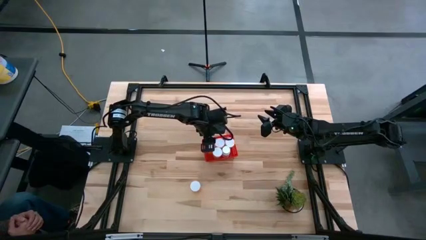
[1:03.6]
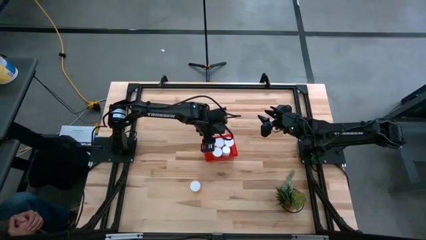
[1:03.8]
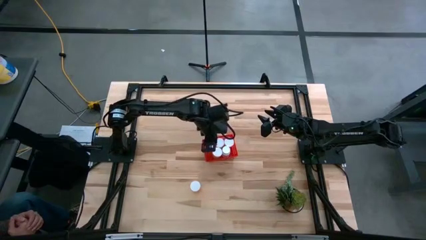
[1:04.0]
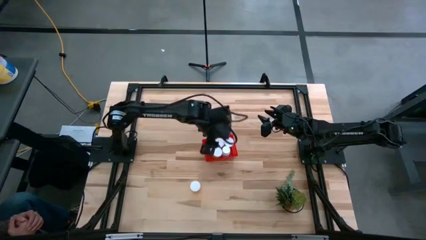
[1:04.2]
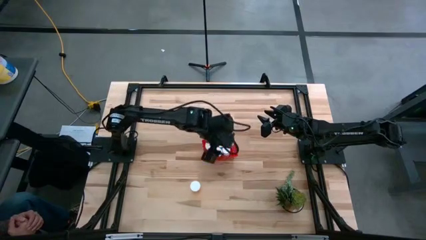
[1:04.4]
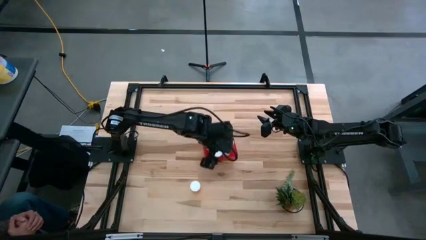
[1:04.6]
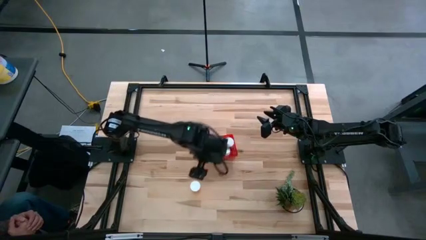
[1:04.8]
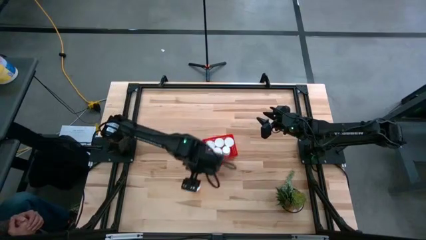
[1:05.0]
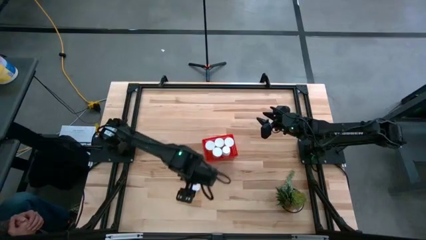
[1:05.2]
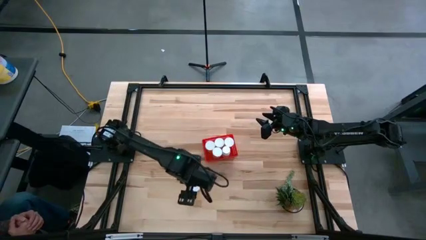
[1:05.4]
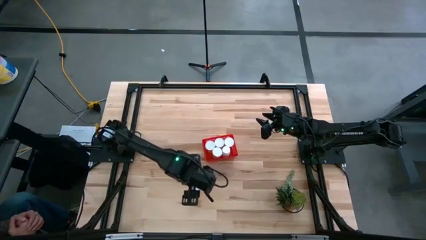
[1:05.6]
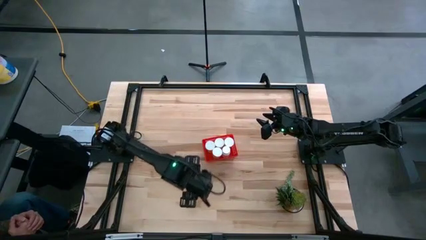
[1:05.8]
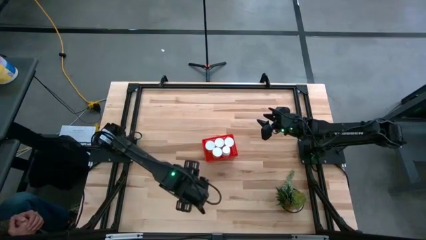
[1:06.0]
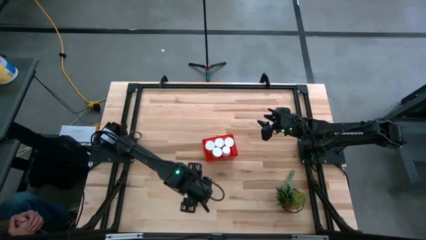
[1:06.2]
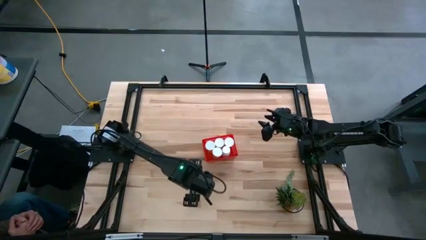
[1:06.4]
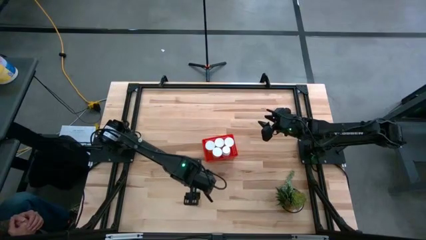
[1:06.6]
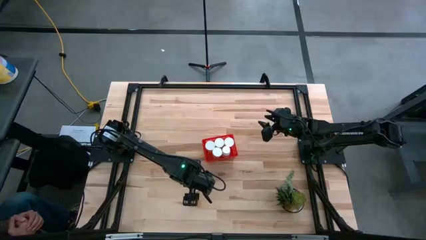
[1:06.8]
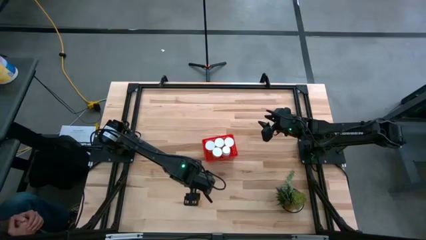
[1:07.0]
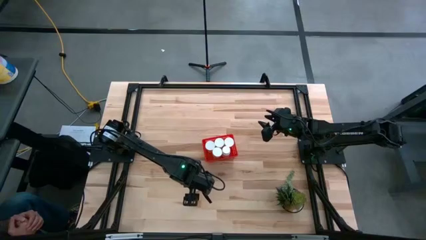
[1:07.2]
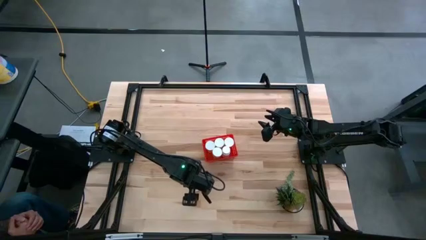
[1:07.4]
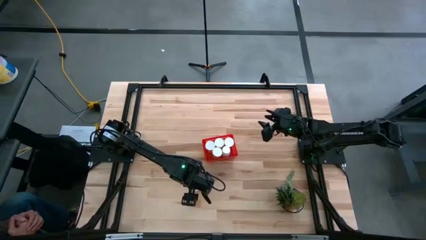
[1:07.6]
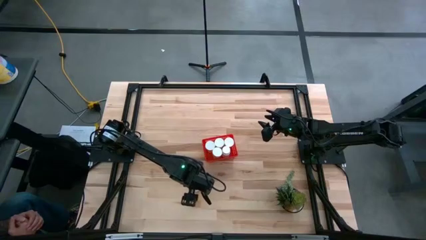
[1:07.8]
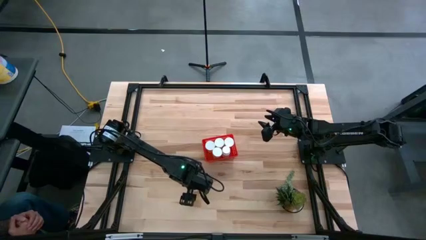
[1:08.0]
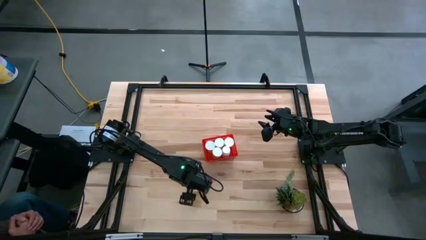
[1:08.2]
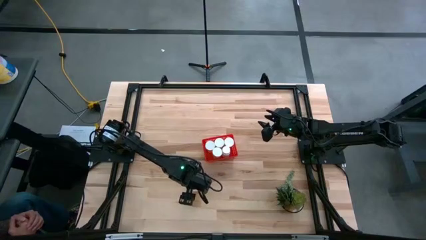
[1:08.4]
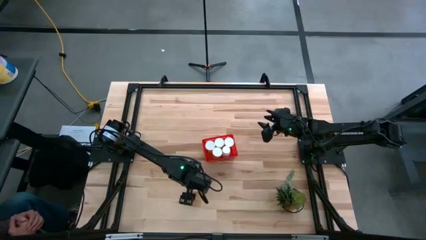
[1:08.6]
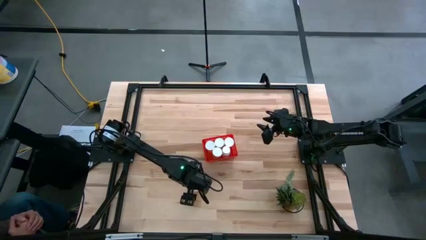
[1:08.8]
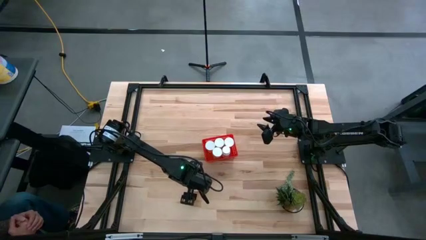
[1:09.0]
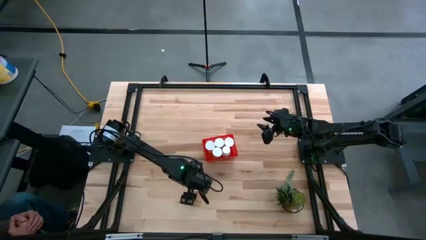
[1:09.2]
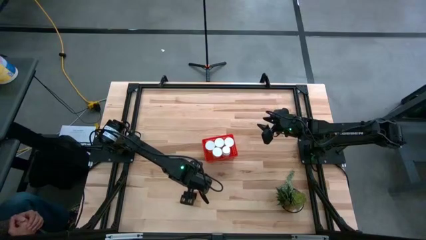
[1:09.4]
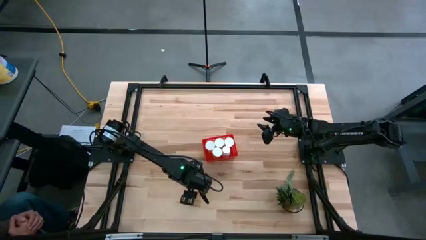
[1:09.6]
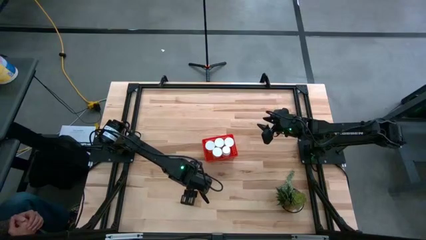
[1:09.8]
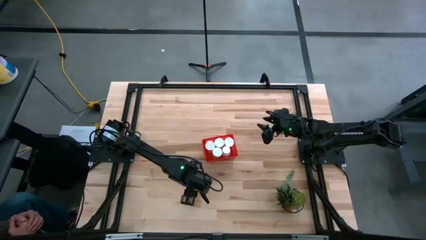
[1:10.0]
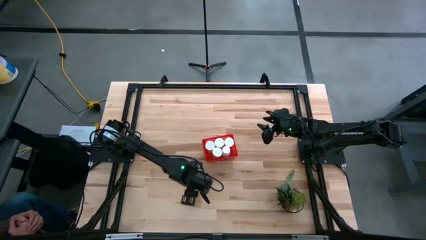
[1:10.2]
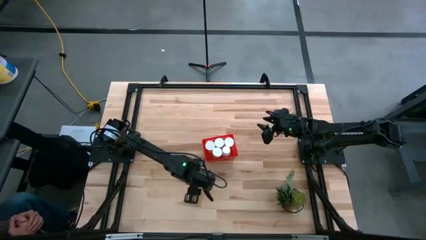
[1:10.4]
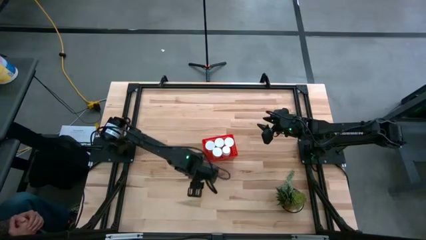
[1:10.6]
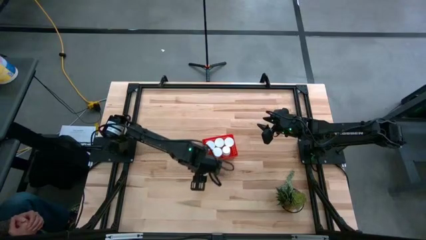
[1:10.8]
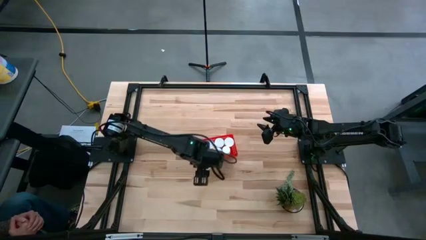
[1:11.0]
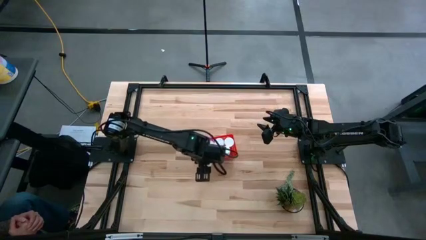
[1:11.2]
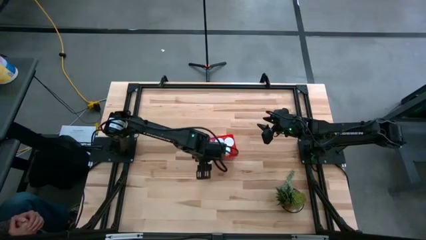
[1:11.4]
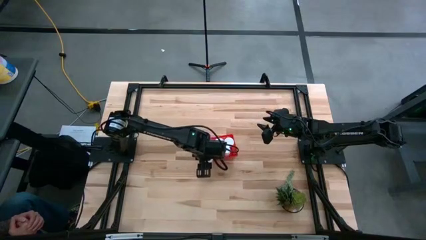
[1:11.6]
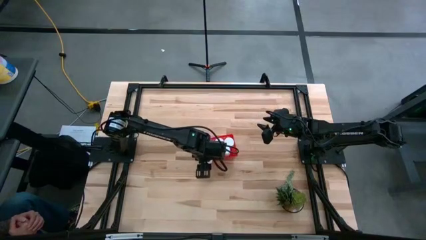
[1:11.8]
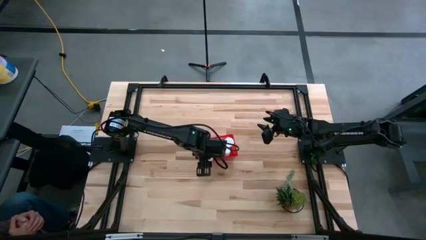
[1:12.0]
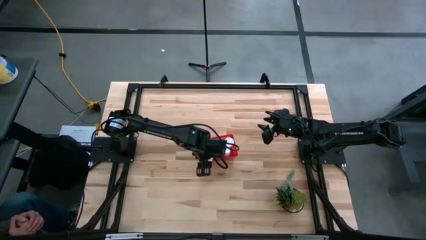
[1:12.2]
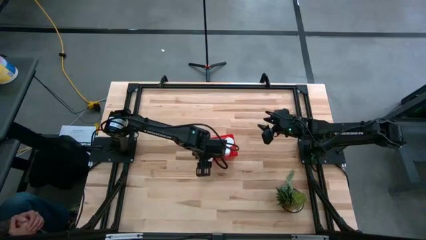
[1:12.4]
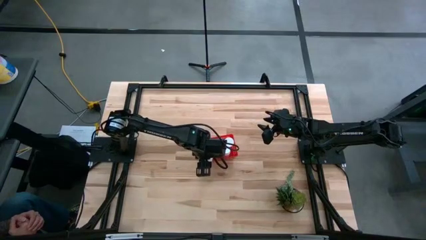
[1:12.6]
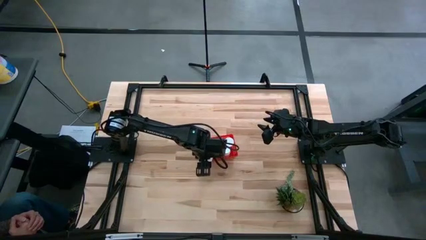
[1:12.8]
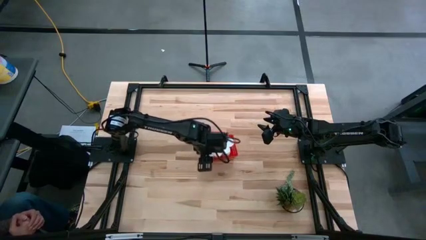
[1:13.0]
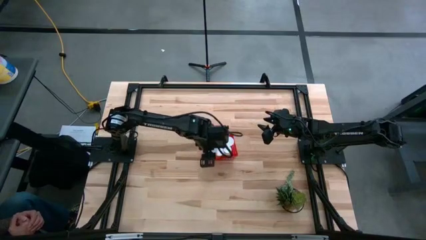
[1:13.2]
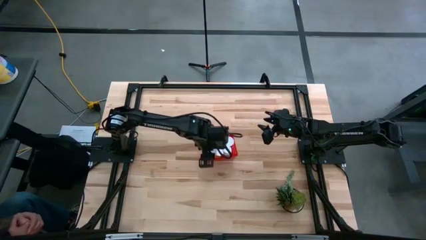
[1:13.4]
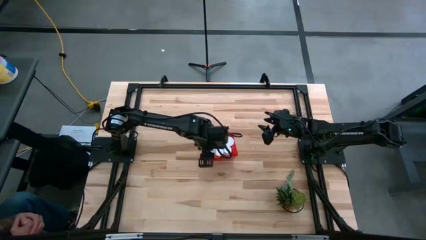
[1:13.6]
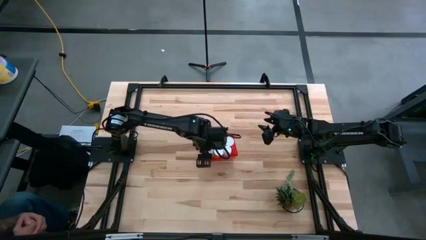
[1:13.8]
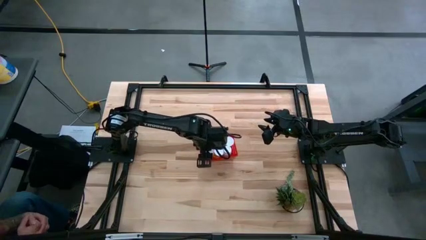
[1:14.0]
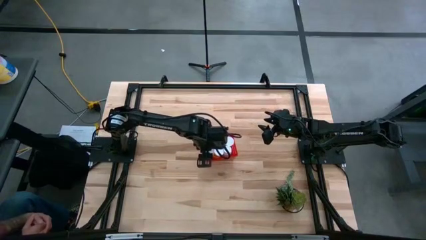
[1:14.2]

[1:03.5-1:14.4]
Task: Pick and place pill bottles into a basket
Put the orange medicine bottle into the bin

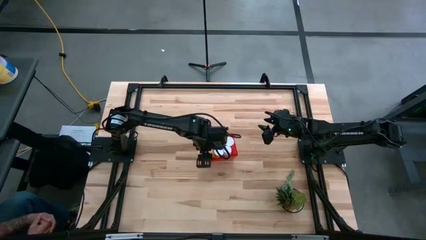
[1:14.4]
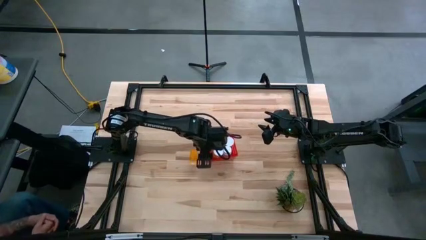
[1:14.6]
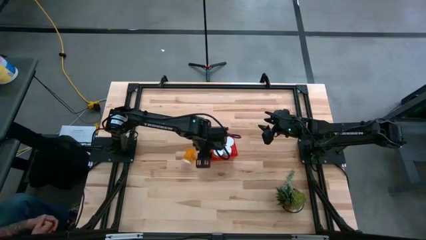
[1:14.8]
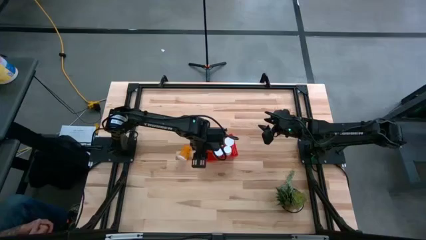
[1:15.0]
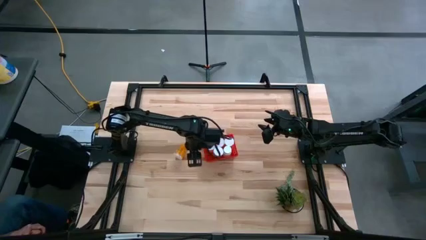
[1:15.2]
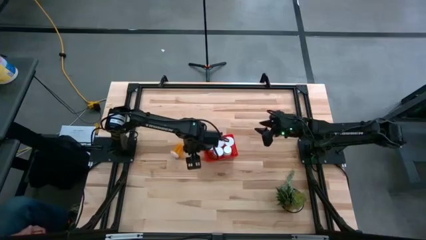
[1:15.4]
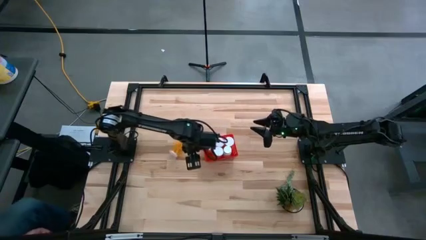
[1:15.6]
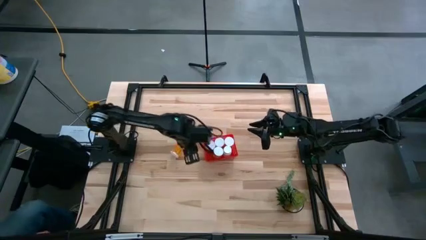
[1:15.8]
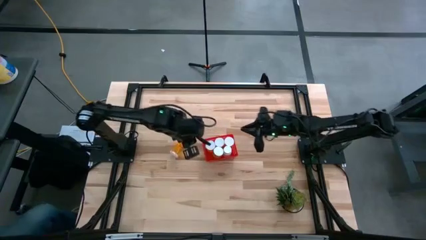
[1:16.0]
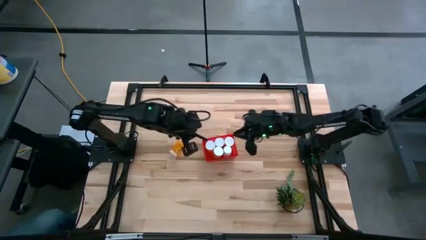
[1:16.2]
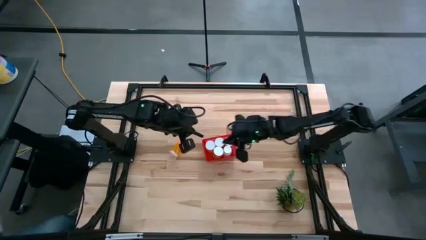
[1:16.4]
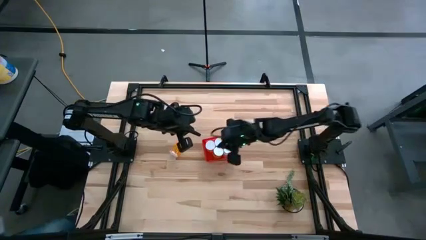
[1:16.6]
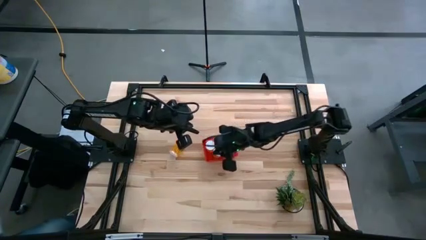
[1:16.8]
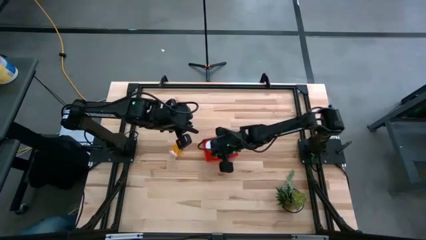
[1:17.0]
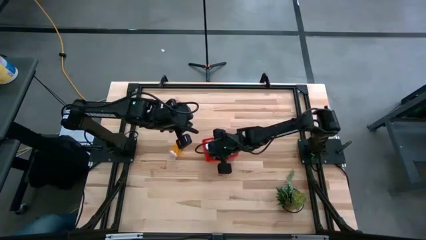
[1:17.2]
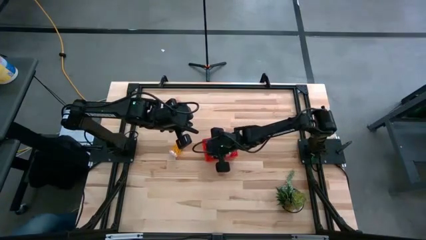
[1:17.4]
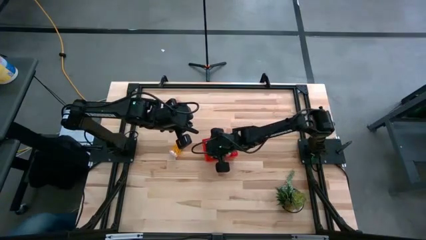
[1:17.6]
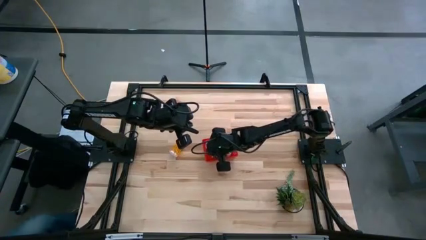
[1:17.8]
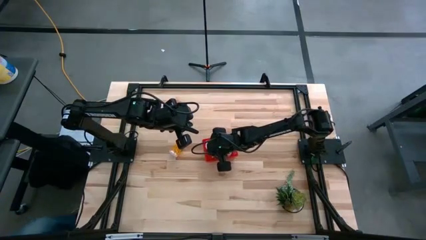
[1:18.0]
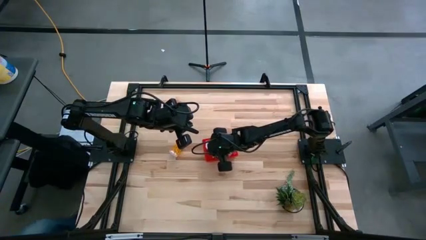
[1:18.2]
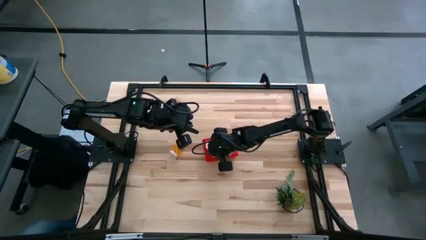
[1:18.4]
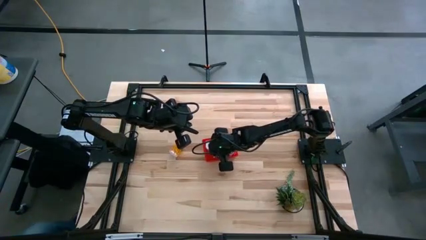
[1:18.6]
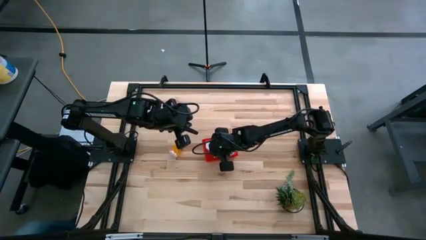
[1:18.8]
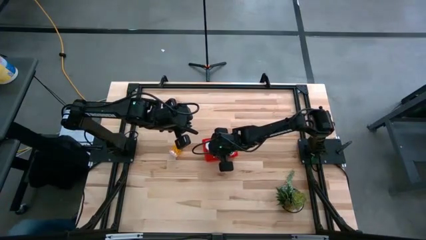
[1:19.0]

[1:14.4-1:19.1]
Adjust the medicine bottles into the bin
